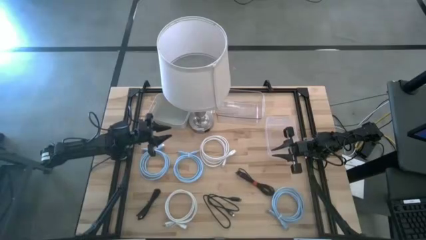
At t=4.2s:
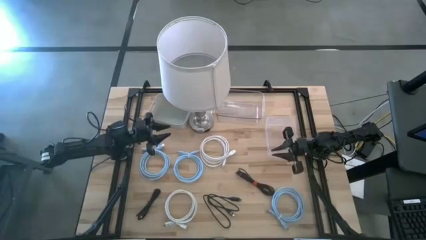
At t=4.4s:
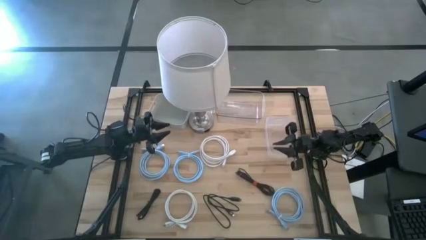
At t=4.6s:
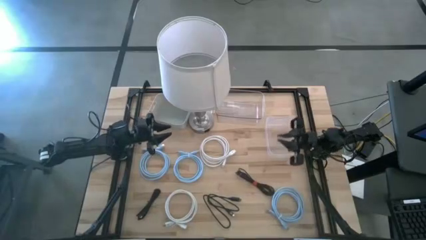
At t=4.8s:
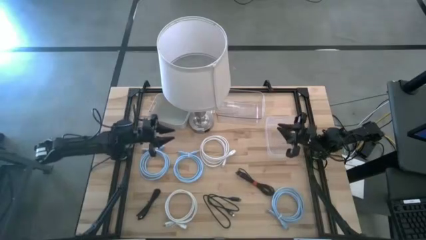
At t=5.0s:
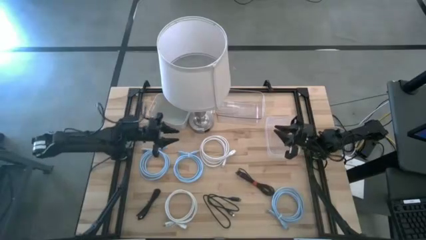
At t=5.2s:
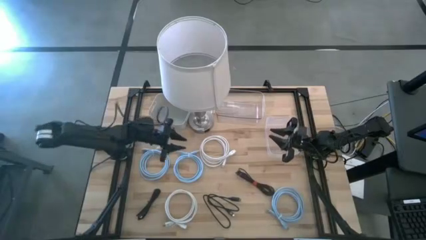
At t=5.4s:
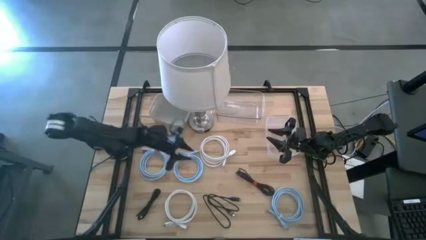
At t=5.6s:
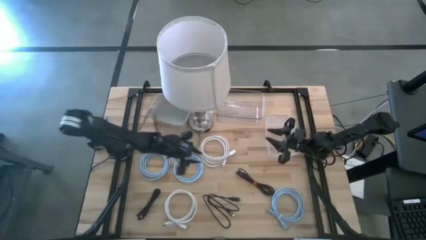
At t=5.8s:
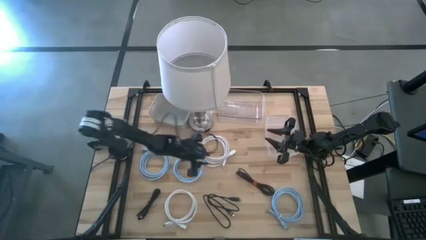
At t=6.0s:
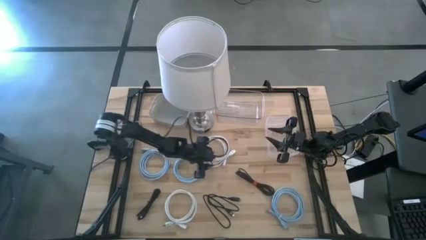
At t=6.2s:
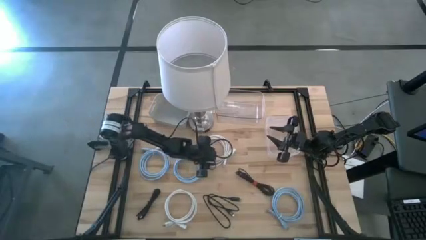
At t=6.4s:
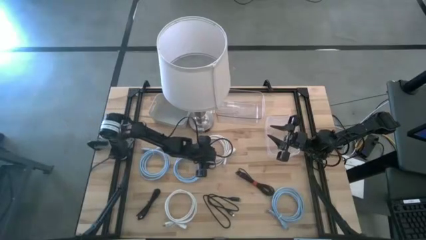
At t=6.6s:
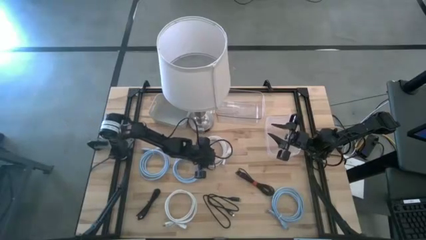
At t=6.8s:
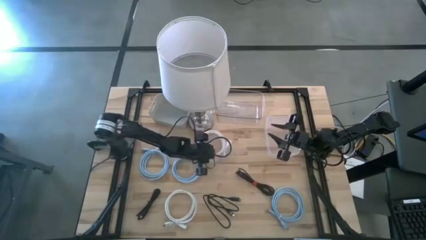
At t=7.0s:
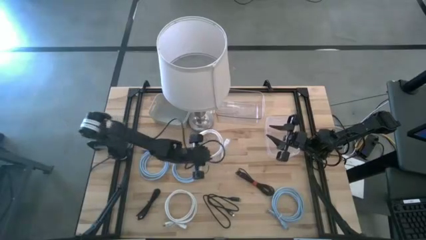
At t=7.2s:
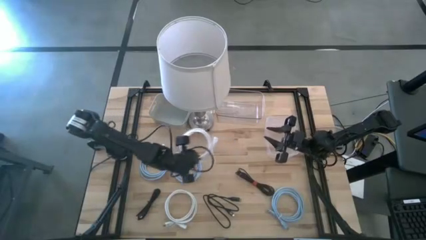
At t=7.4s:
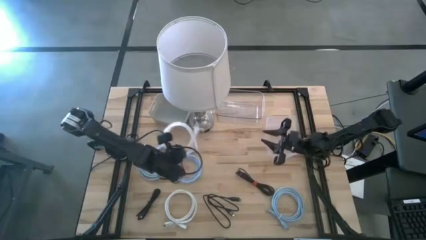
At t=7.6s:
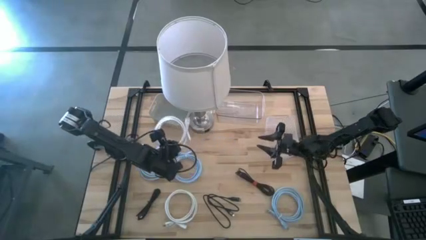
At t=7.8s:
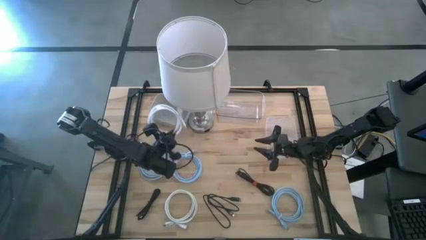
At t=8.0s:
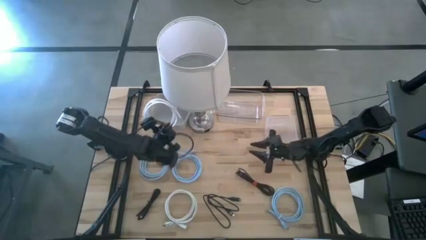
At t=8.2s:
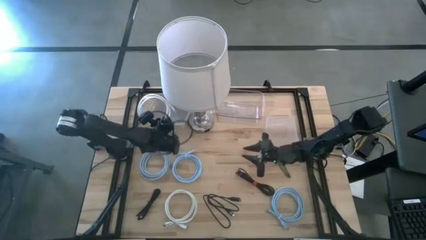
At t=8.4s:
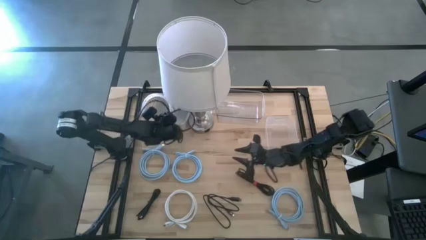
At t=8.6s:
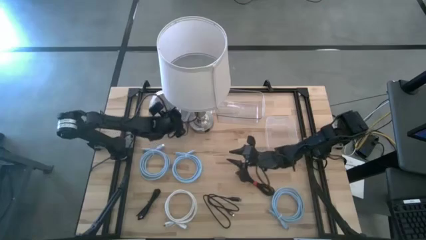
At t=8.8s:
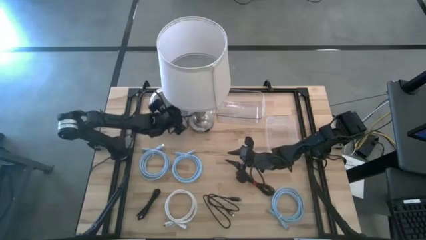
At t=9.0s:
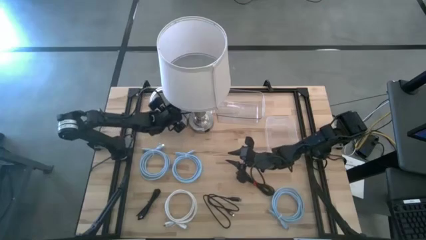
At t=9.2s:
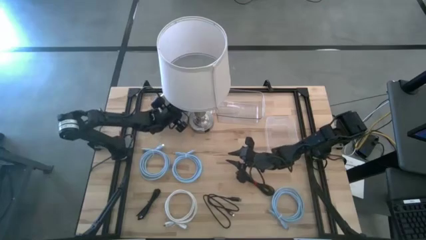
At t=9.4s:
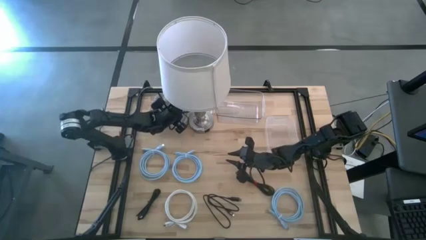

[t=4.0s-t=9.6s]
Task: Pick & Place USB Port
Put the top white HDMI cable into the white bin

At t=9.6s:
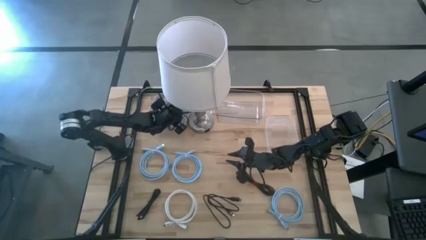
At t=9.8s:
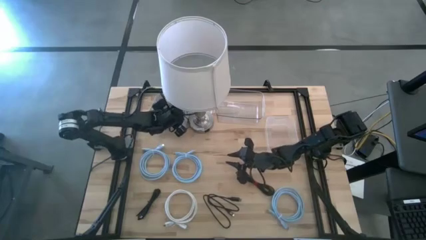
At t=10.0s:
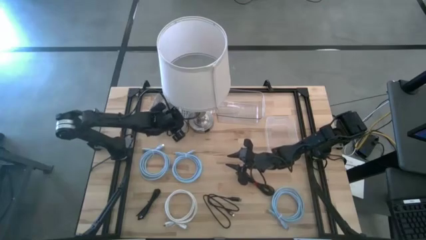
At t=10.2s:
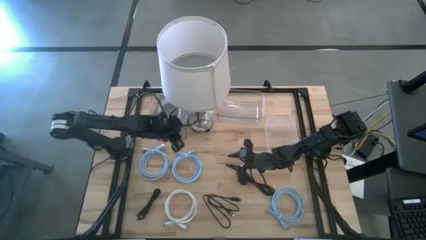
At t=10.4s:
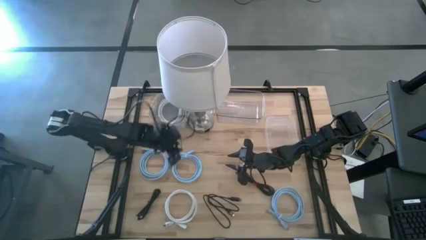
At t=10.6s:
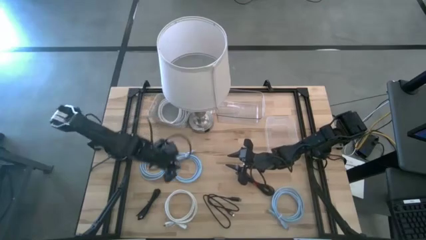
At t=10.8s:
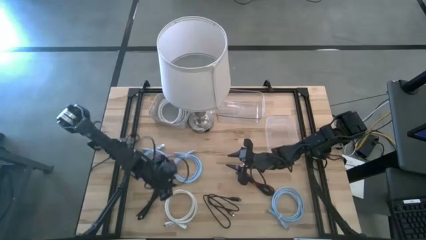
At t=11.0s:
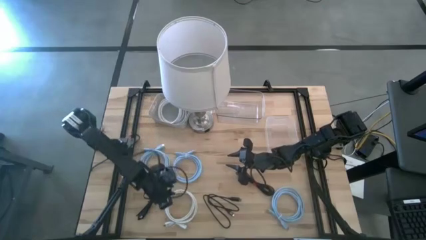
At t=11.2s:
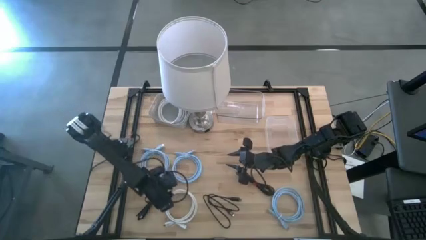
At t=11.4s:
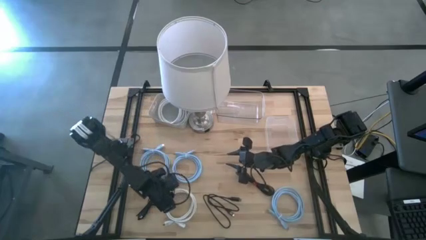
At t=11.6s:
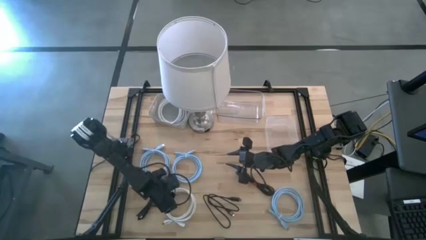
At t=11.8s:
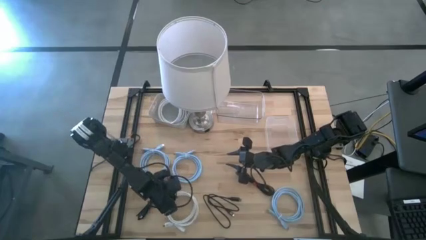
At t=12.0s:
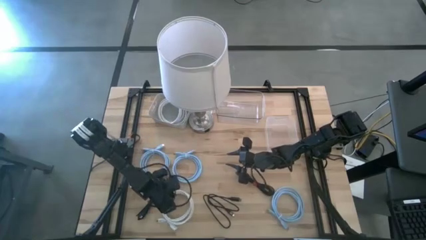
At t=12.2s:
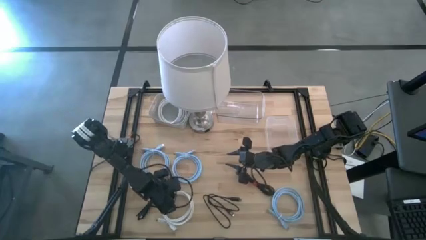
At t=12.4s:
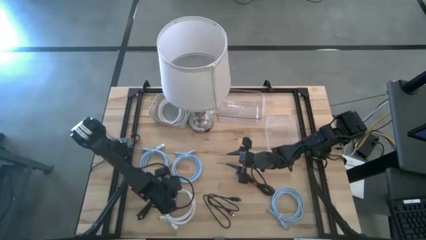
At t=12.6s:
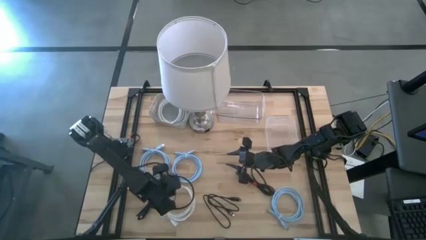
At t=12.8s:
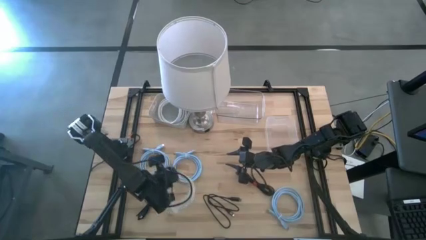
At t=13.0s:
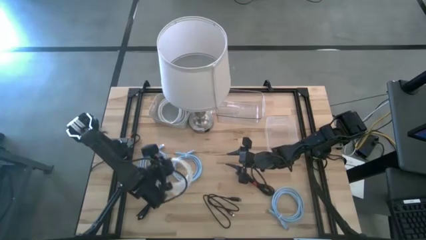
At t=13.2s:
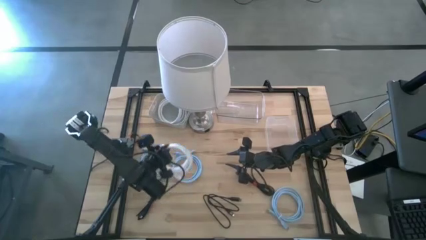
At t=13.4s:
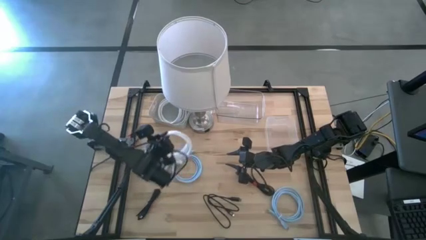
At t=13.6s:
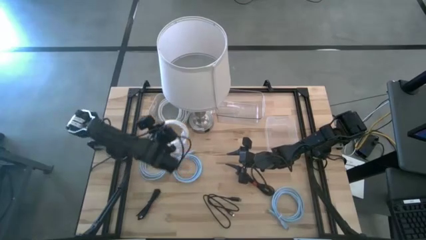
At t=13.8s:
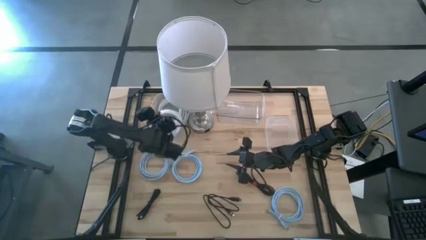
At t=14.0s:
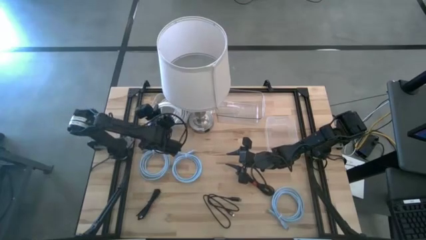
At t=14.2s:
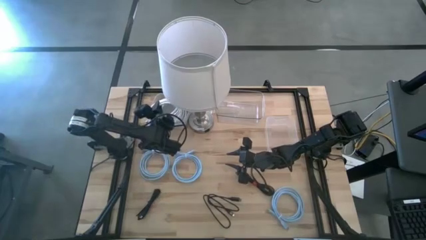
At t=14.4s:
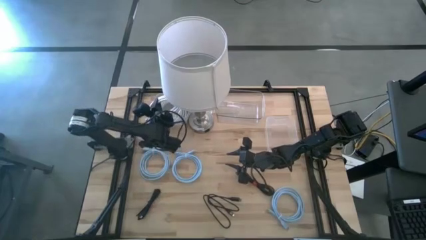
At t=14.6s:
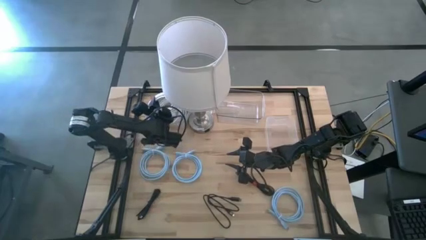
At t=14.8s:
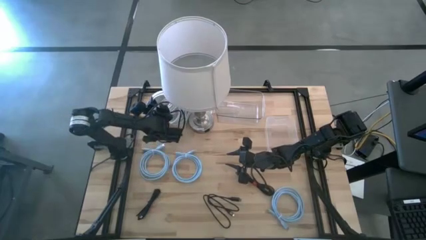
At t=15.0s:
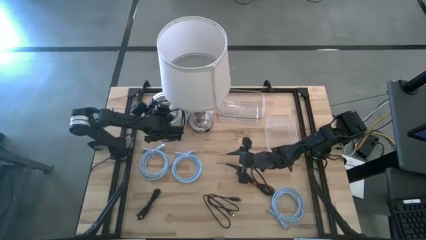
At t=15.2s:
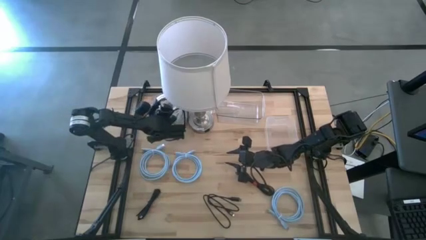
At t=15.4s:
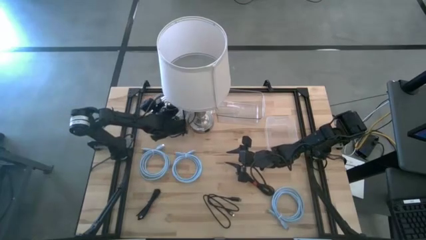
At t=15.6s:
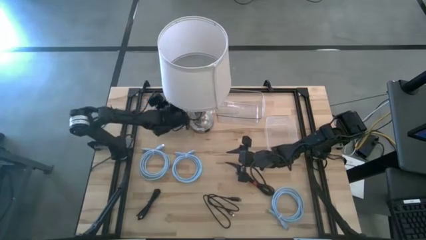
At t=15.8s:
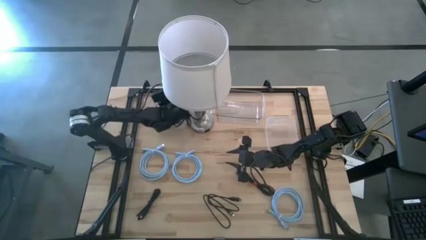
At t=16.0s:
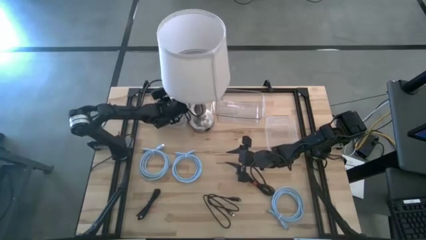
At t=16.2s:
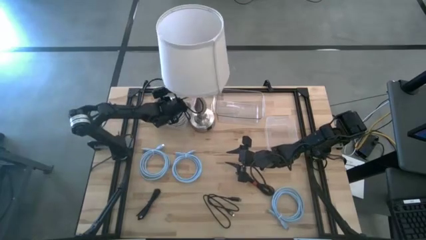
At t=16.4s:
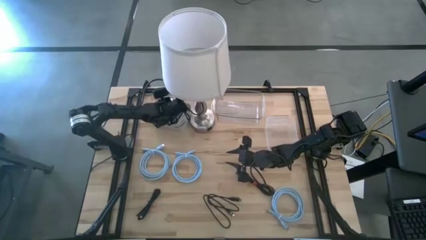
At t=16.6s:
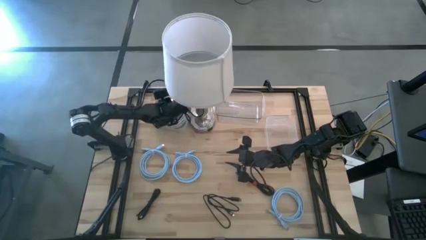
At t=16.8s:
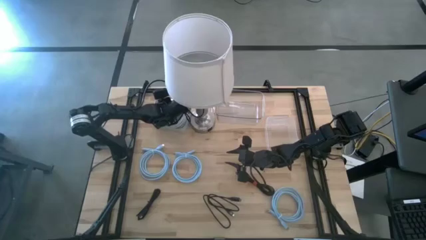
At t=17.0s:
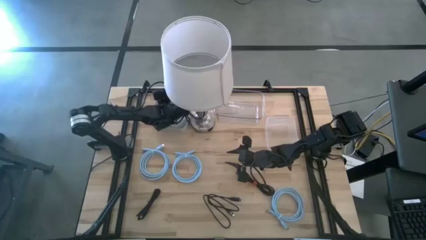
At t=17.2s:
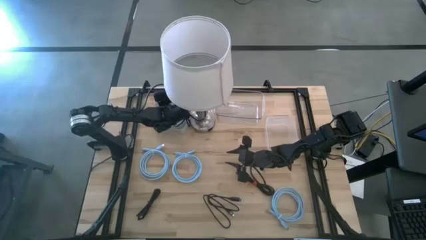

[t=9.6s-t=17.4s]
Put the white HDMI cable into the white bin

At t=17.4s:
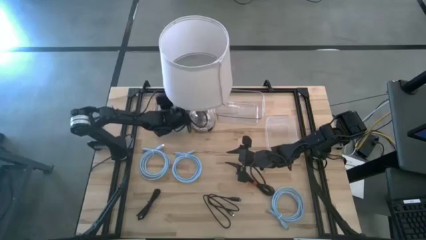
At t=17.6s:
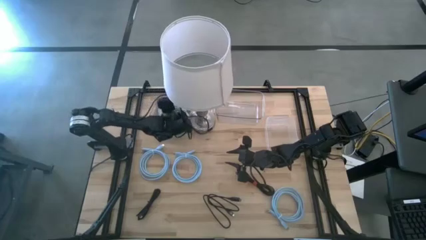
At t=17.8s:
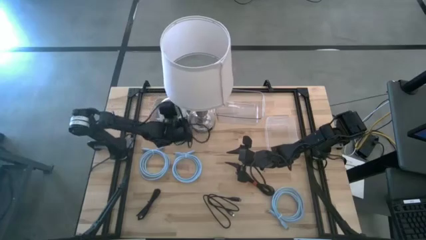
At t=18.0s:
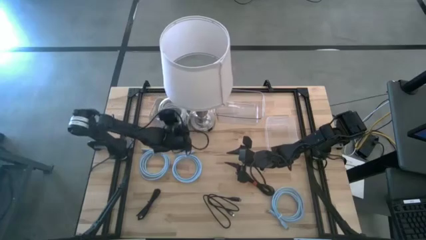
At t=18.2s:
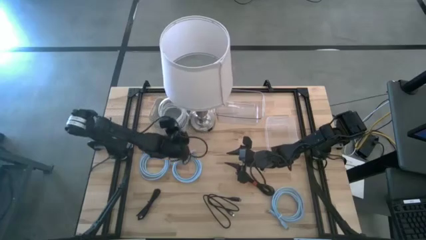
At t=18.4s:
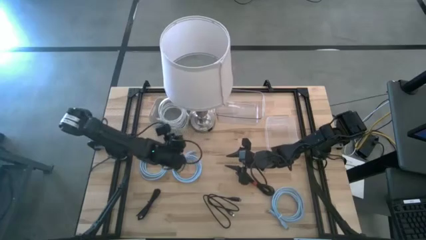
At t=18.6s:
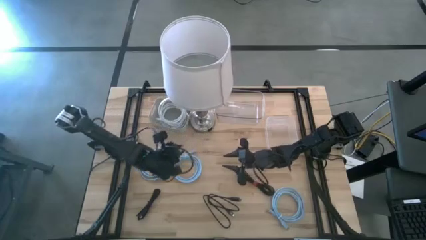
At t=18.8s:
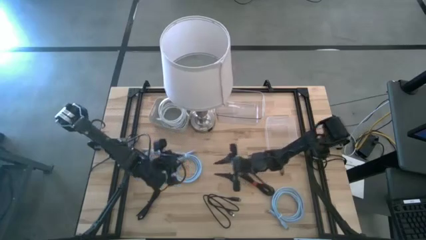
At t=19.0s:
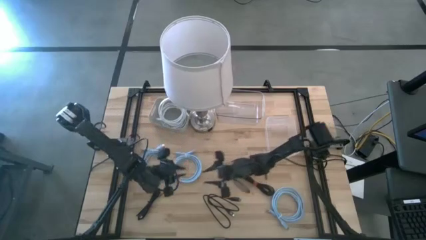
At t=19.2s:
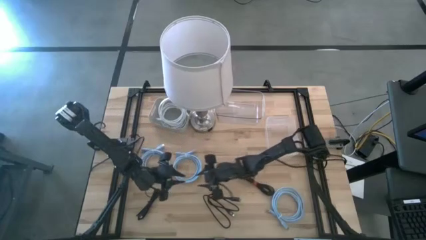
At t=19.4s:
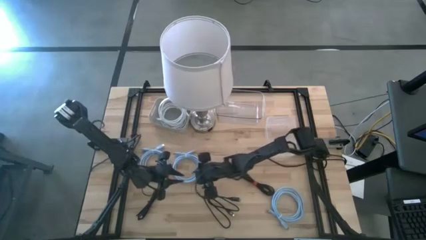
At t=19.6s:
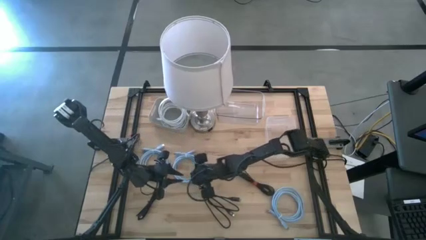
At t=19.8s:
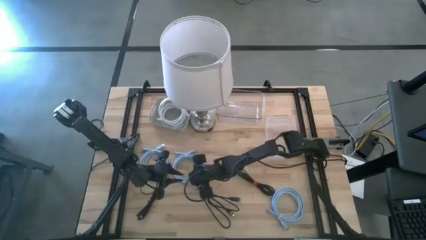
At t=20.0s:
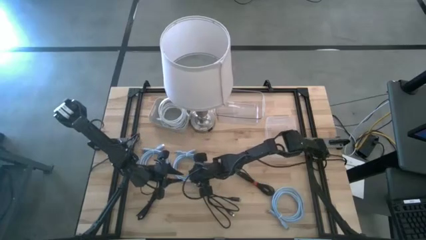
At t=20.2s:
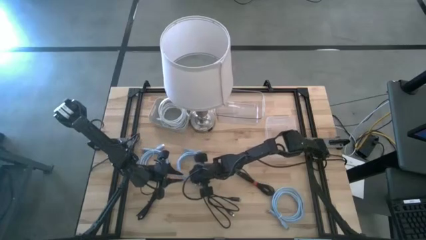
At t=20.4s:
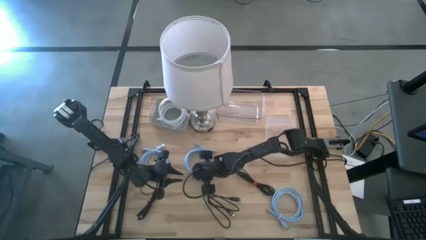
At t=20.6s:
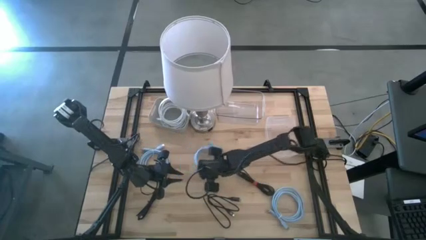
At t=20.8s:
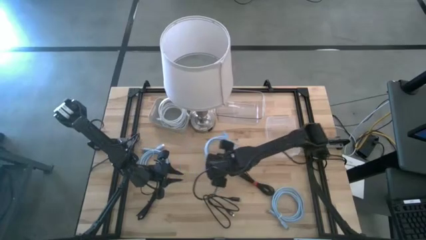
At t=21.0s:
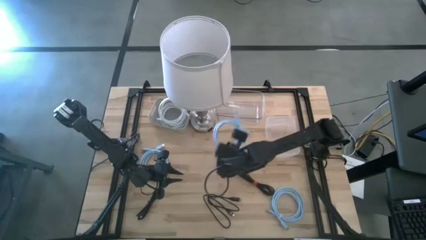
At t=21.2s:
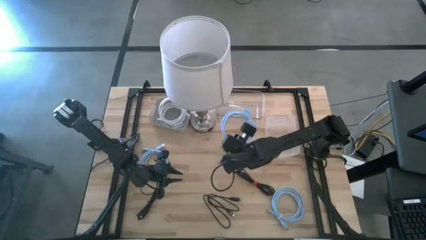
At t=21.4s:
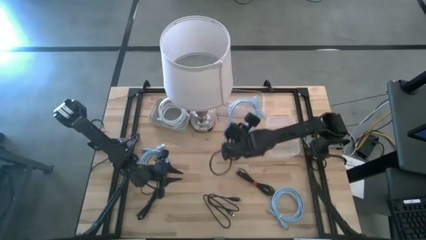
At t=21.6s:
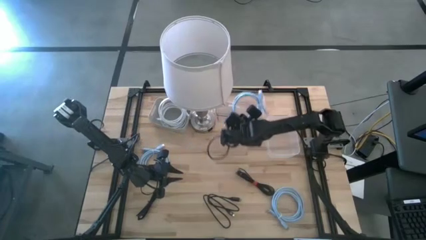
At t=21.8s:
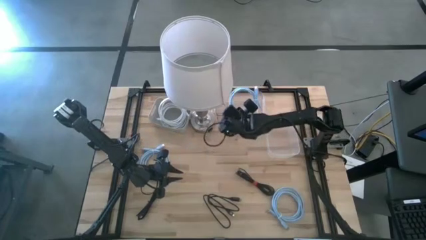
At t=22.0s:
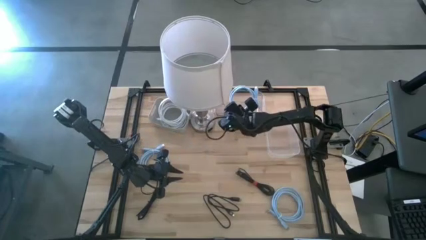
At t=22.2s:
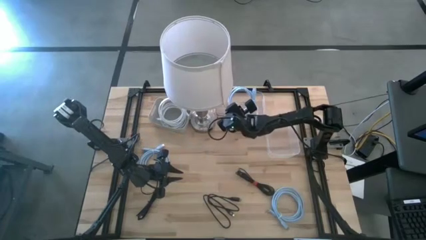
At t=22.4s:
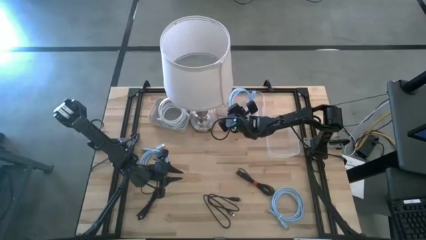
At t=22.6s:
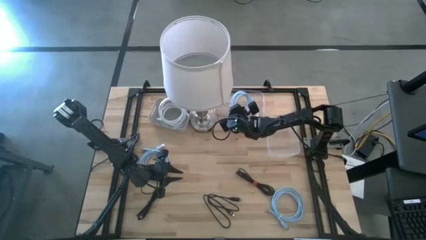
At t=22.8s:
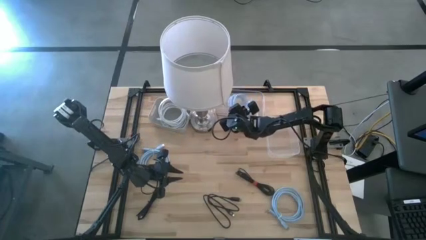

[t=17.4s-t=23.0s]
Put the middle blue HDMI cable into the left transparent bin
